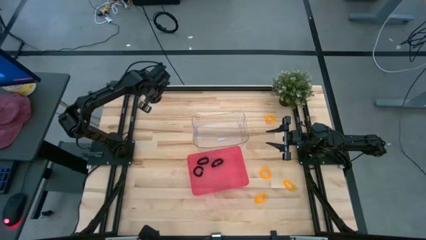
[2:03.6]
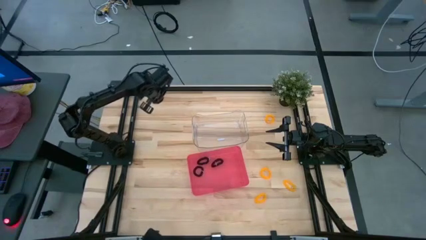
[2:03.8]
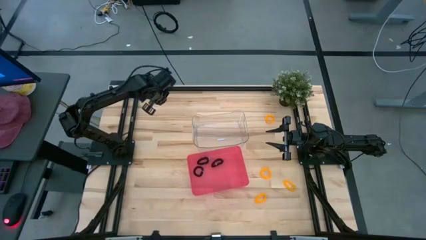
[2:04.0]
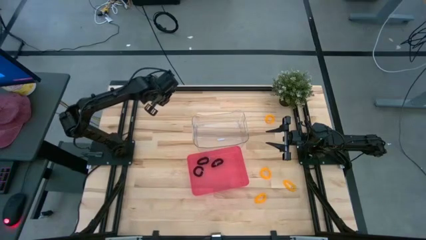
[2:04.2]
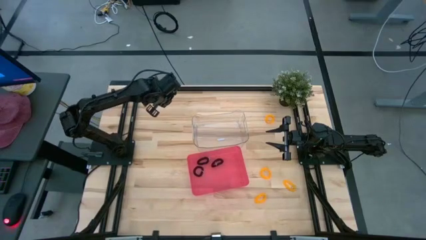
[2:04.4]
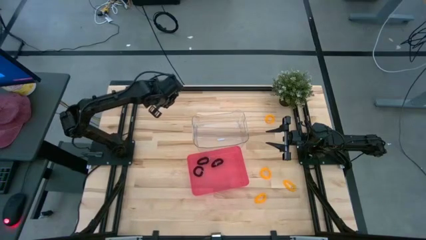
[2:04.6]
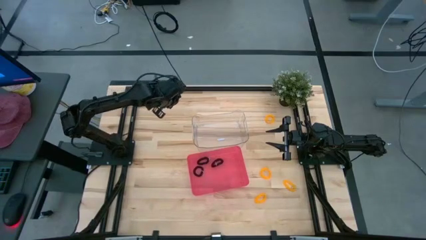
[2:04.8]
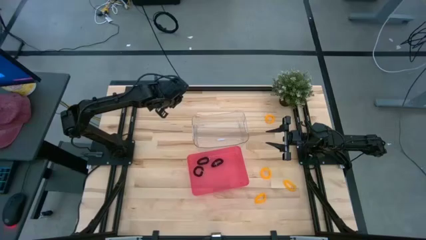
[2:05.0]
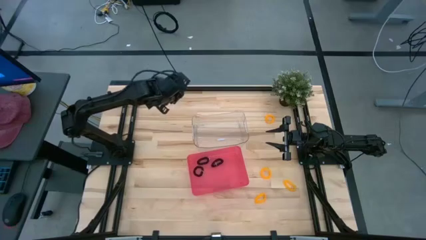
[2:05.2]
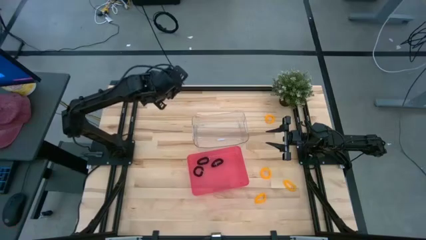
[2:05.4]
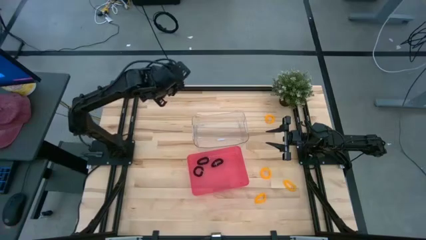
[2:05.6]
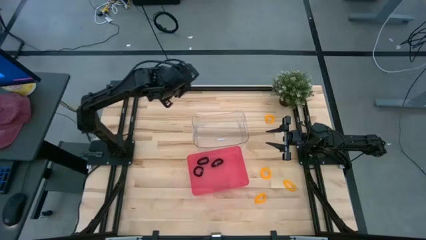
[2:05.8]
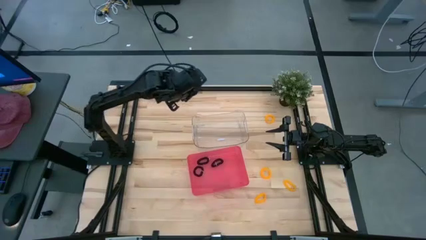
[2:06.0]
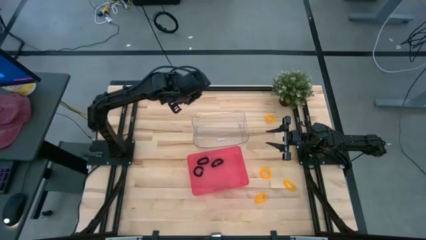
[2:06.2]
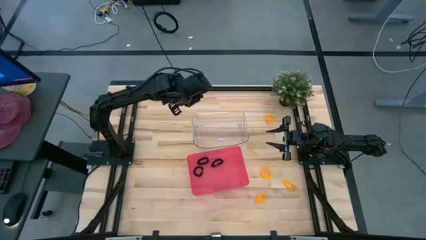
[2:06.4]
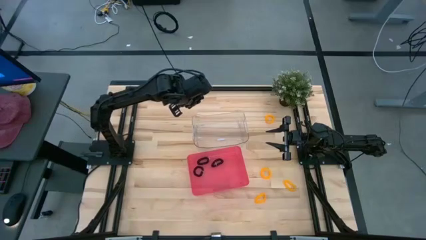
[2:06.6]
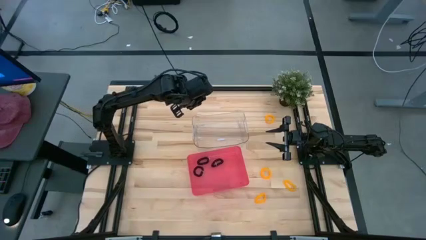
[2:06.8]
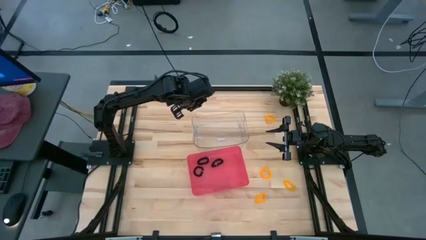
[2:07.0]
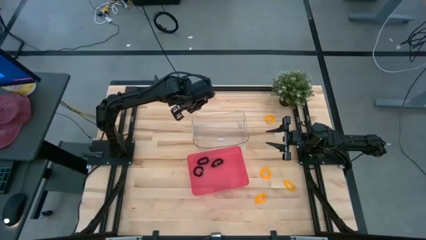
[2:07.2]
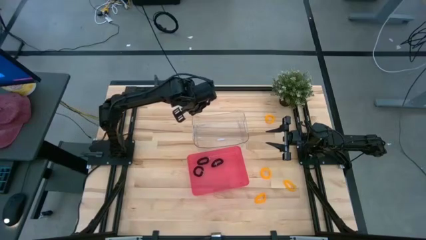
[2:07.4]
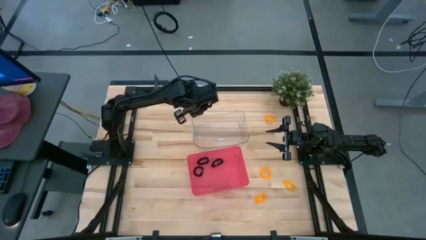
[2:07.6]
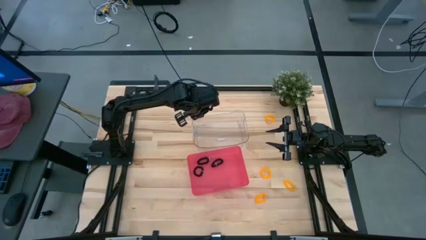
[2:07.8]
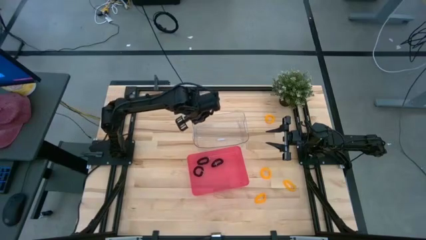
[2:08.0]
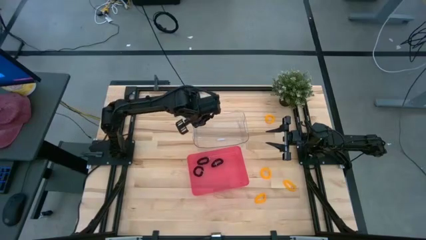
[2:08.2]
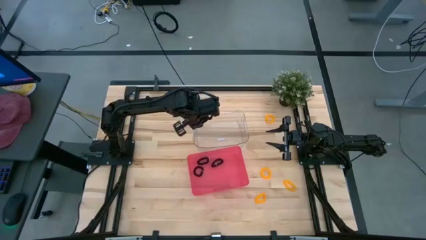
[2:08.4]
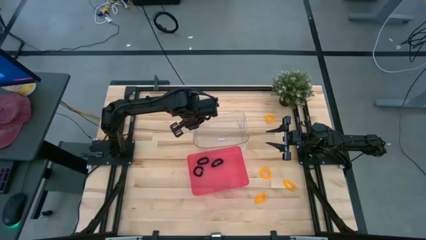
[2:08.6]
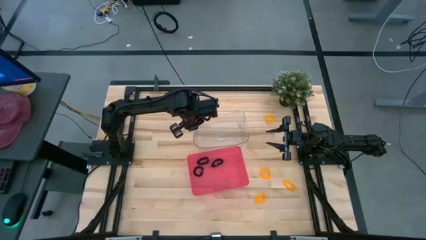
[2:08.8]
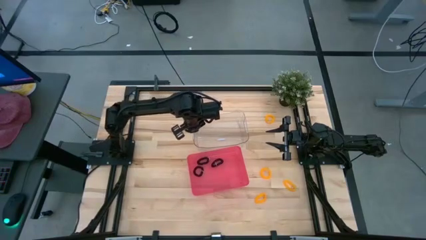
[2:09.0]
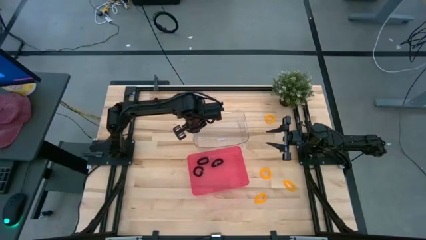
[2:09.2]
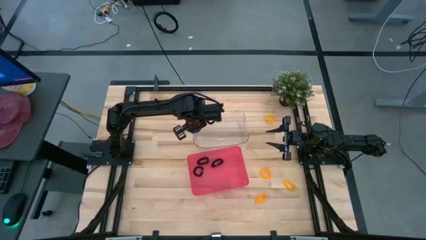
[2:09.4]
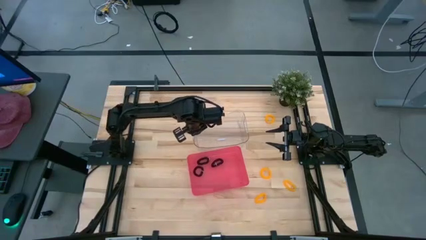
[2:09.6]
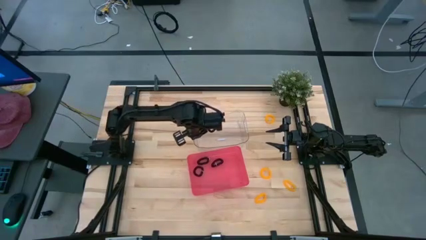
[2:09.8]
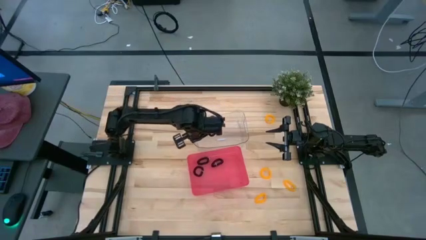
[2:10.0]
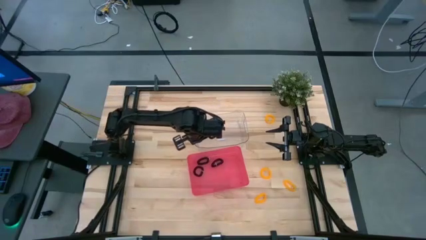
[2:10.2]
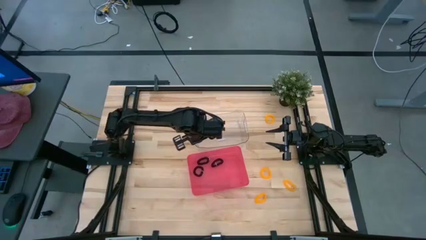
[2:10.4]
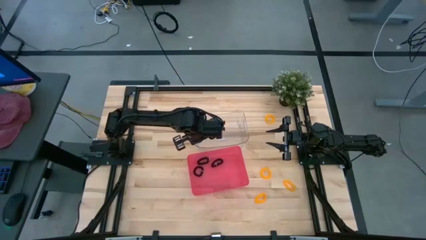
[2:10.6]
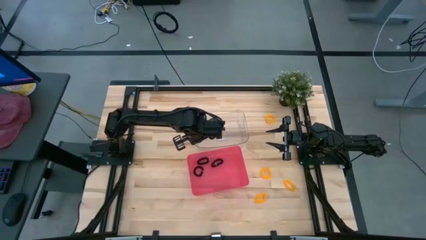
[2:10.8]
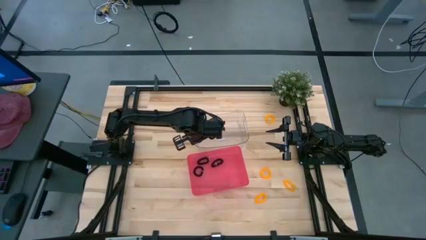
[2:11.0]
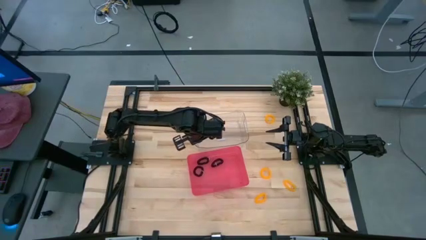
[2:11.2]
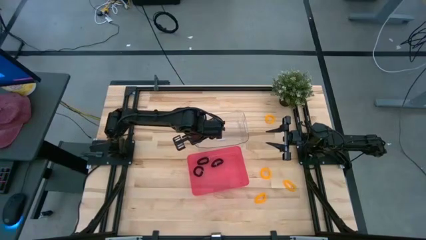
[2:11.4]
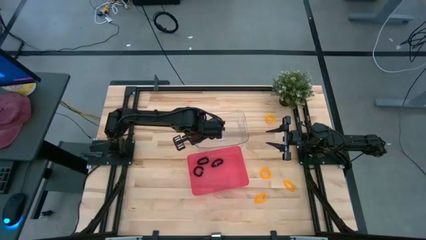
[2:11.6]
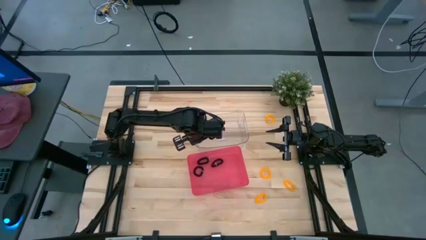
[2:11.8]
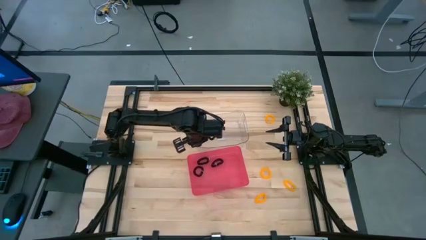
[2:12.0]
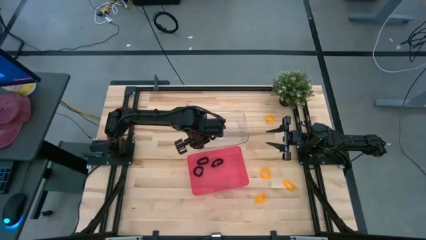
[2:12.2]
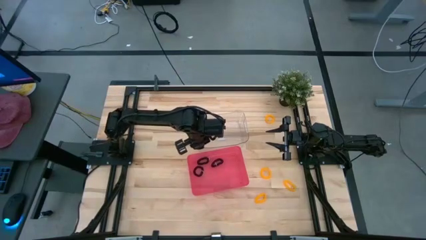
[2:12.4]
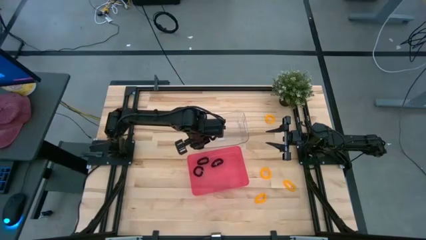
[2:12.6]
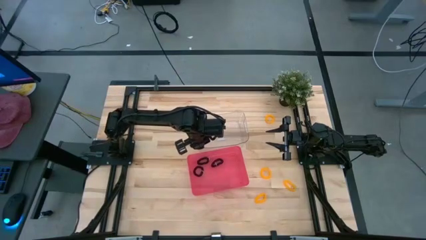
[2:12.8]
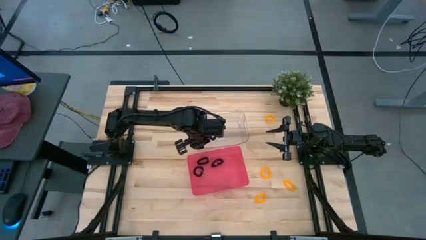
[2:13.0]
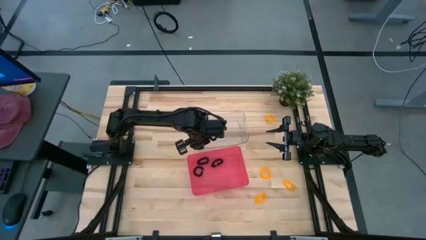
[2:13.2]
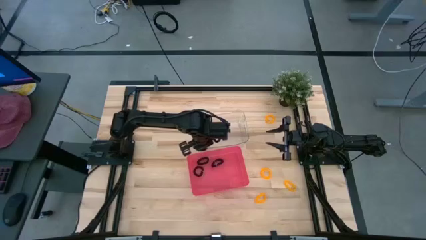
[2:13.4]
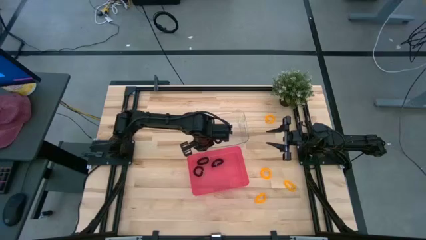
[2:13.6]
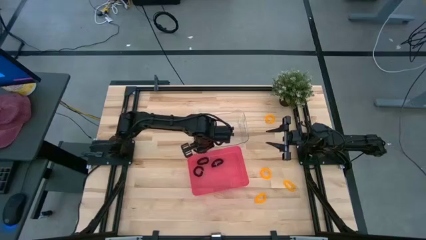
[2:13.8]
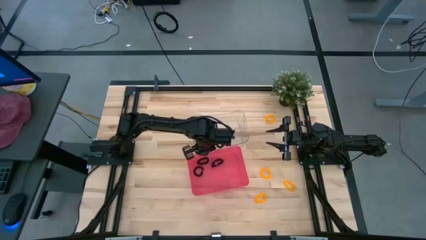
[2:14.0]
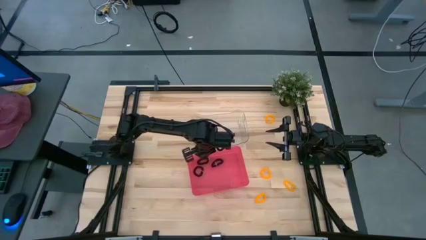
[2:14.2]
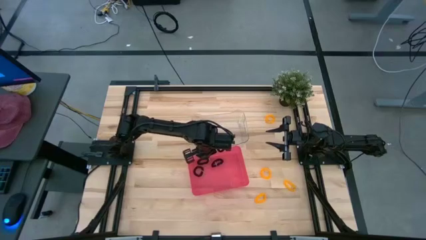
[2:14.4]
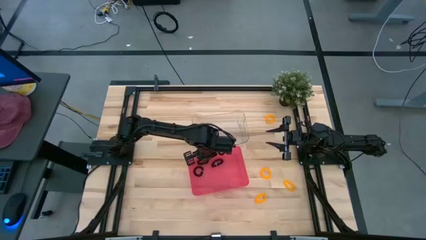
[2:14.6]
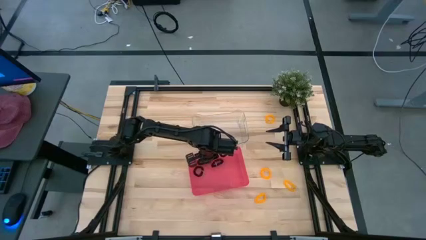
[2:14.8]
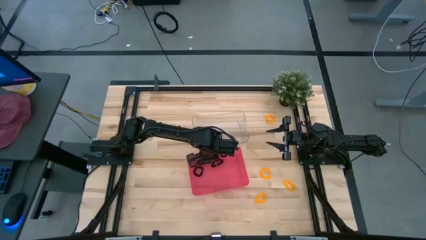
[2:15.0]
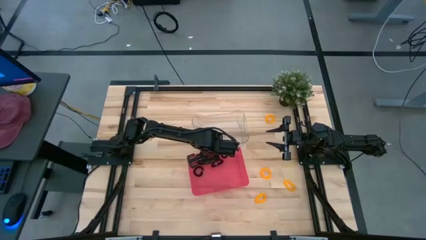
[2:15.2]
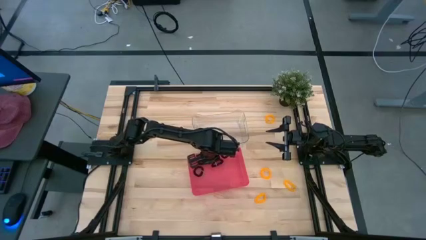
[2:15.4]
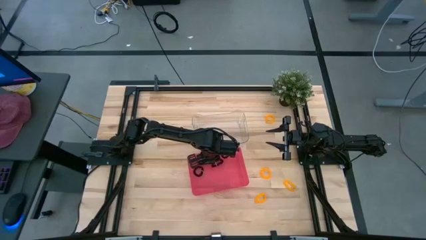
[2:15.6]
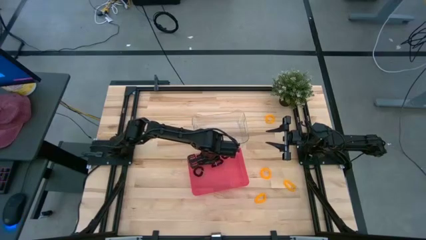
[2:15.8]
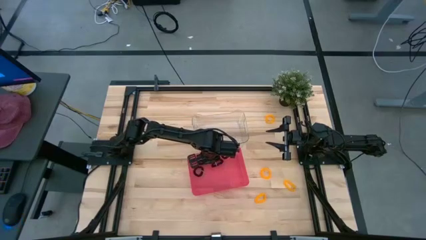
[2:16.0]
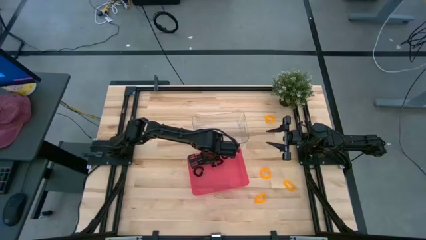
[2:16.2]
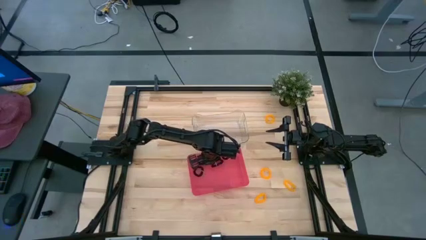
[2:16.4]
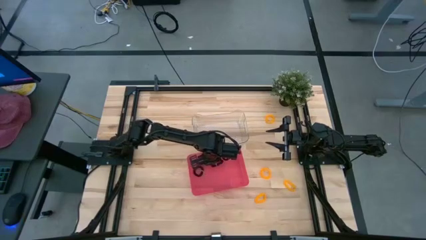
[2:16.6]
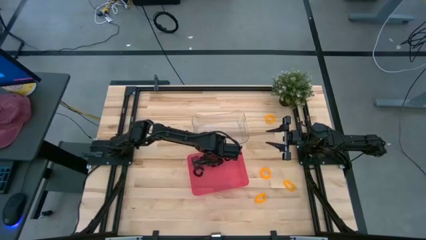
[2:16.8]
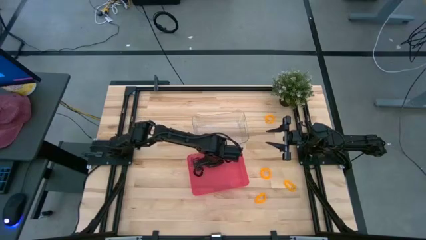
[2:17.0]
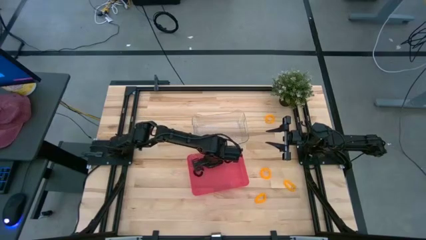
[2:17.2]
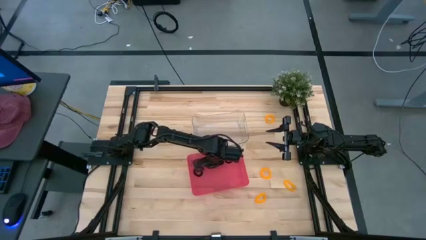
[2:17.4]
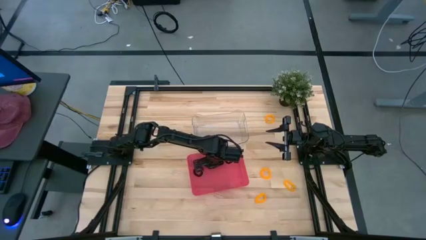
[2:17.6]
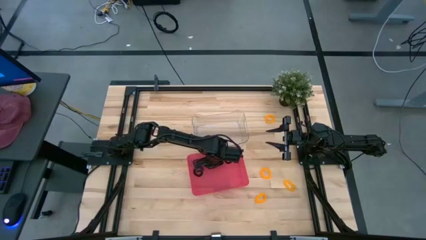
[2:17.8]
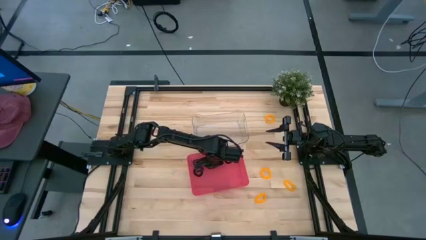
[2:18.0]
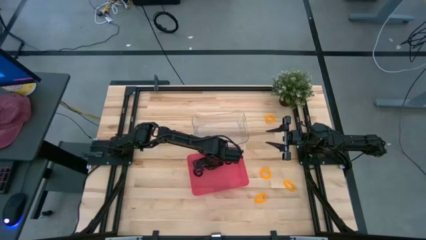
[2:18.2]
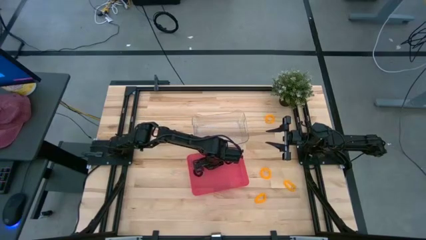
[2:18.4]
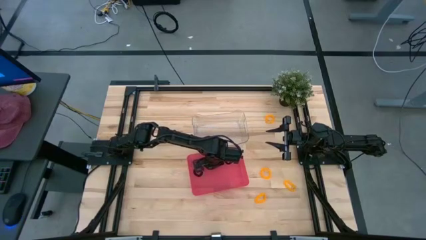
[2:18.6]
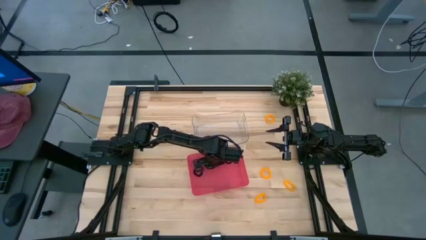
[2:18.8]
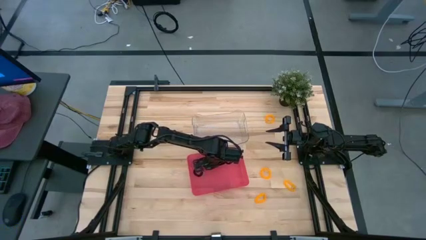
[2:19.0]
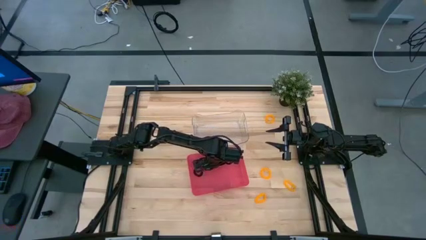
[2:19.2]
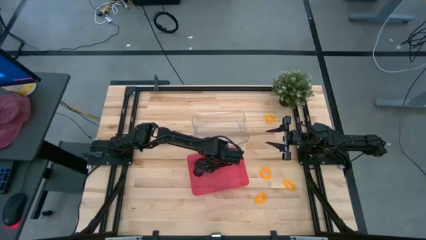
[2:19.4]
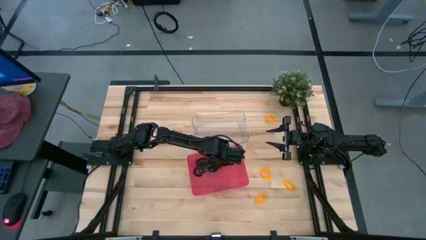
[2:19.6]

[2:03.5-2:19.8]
Task: Sort spring keychains
Put the black spring keychain into the red bin
